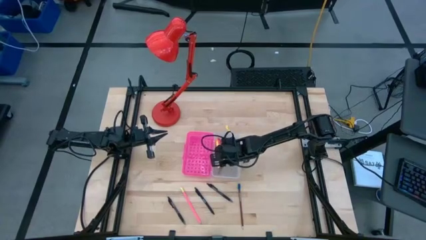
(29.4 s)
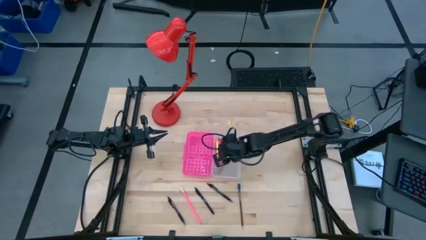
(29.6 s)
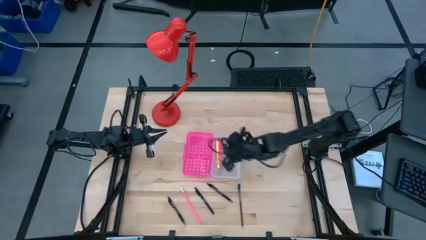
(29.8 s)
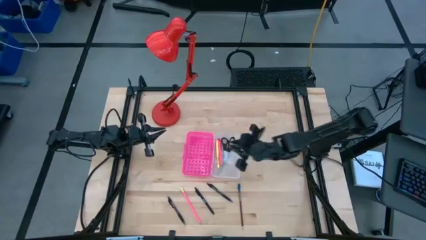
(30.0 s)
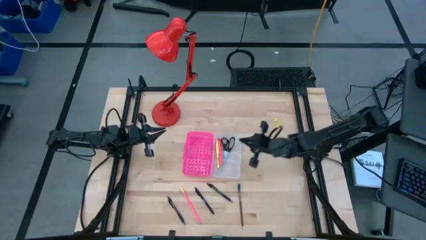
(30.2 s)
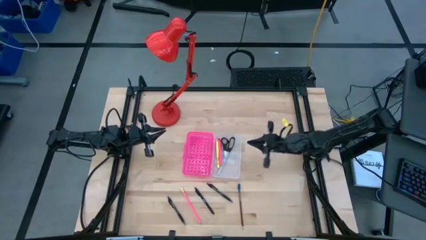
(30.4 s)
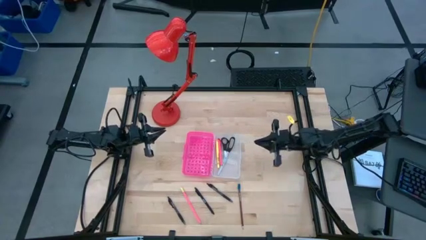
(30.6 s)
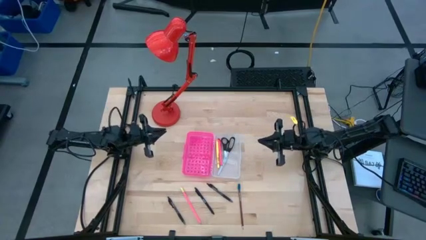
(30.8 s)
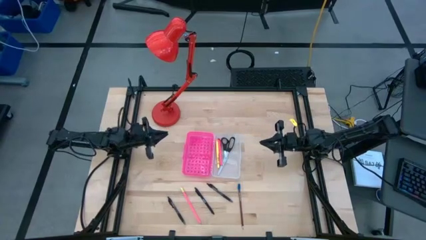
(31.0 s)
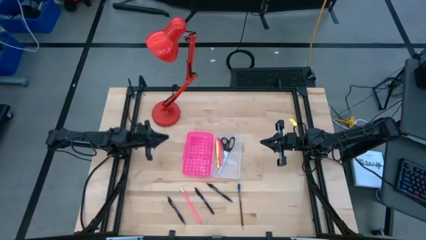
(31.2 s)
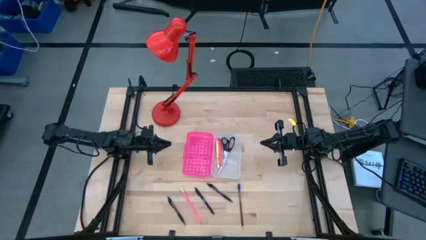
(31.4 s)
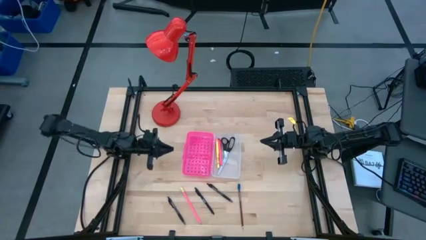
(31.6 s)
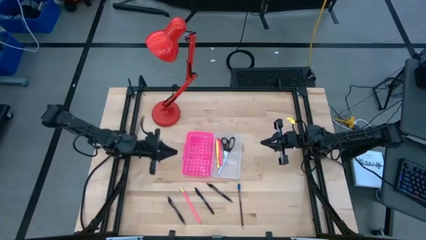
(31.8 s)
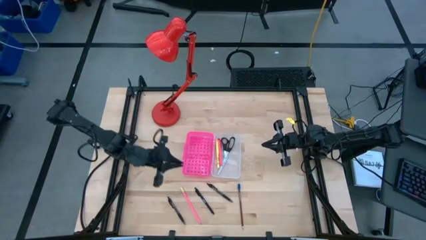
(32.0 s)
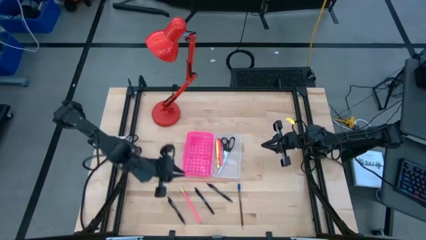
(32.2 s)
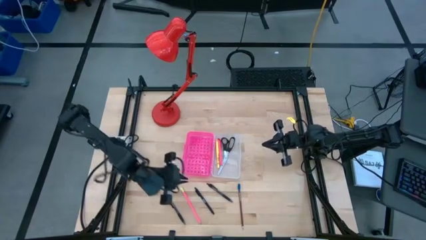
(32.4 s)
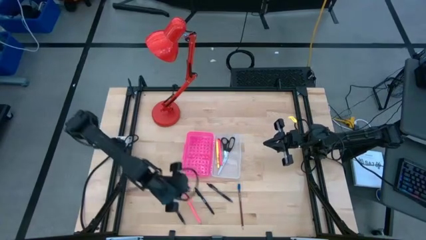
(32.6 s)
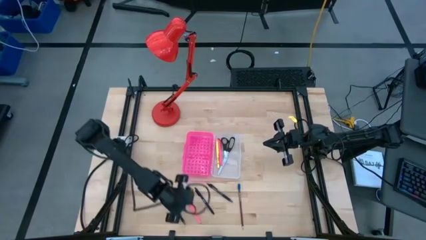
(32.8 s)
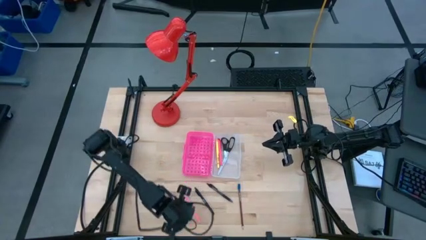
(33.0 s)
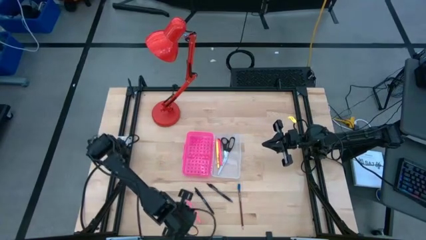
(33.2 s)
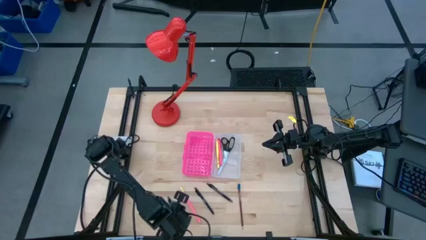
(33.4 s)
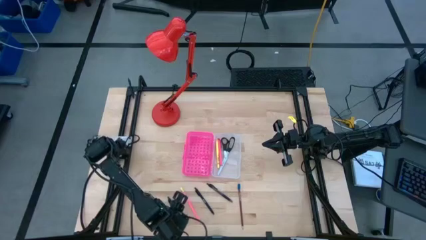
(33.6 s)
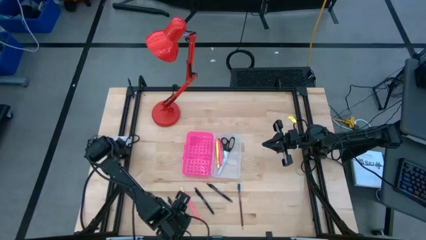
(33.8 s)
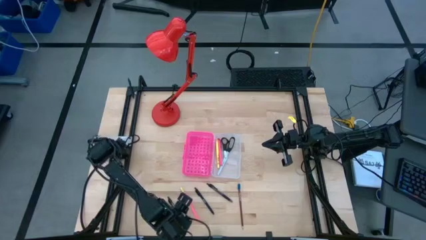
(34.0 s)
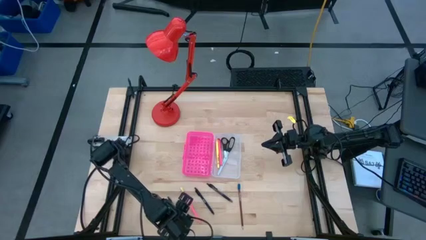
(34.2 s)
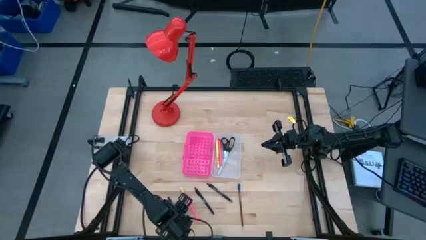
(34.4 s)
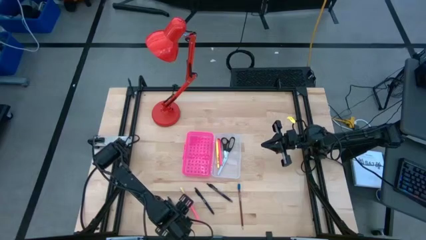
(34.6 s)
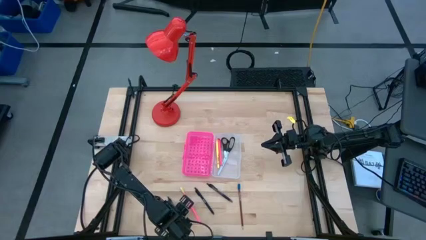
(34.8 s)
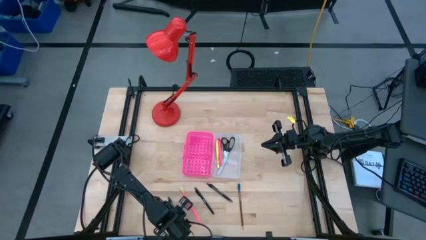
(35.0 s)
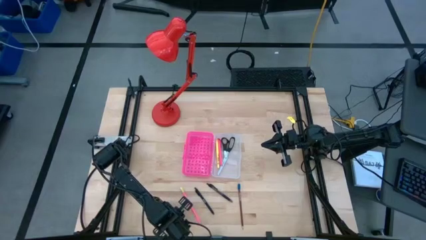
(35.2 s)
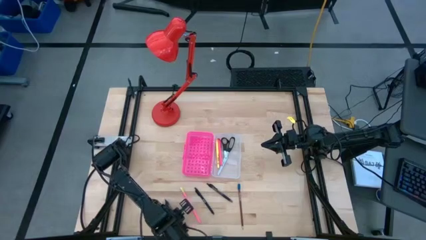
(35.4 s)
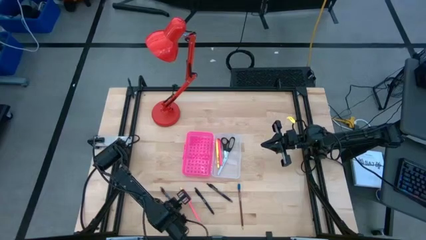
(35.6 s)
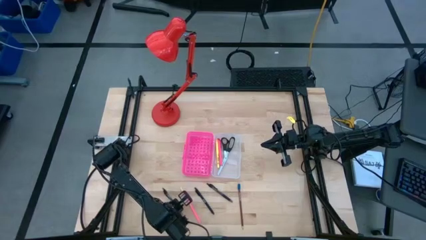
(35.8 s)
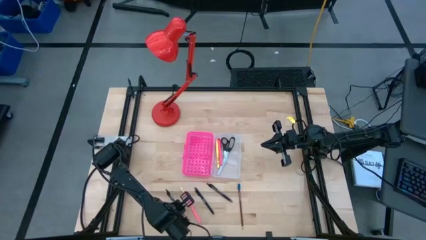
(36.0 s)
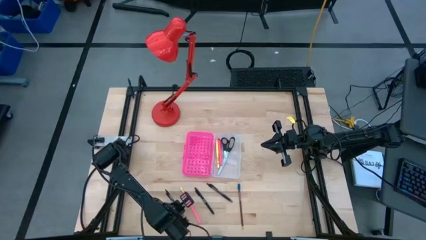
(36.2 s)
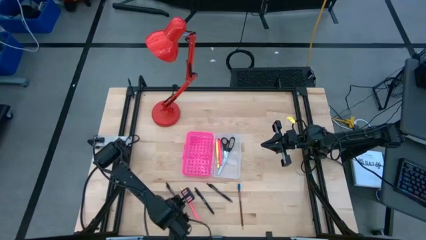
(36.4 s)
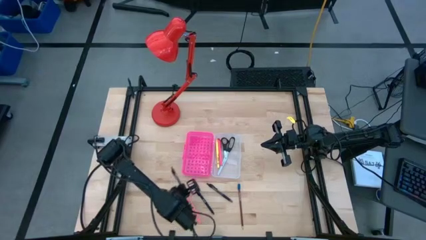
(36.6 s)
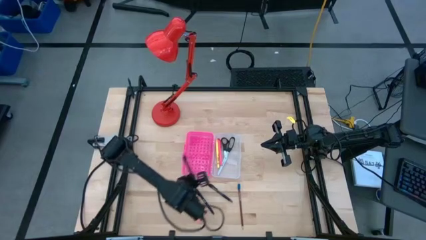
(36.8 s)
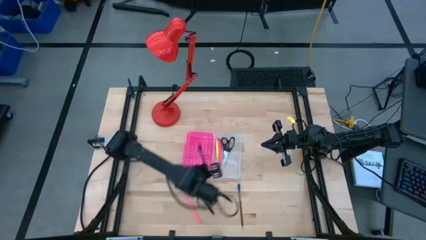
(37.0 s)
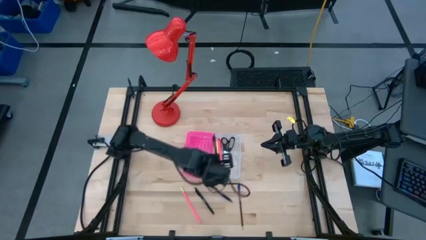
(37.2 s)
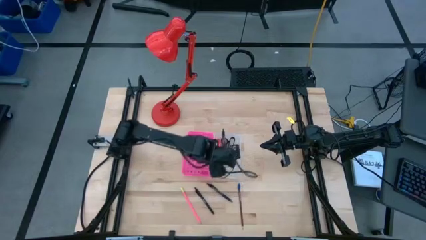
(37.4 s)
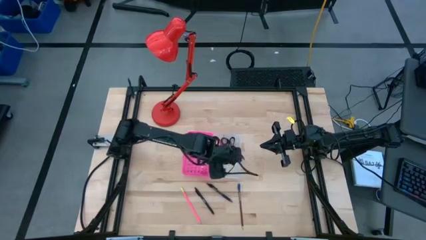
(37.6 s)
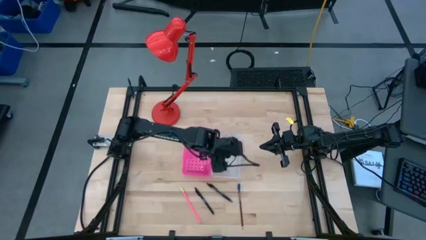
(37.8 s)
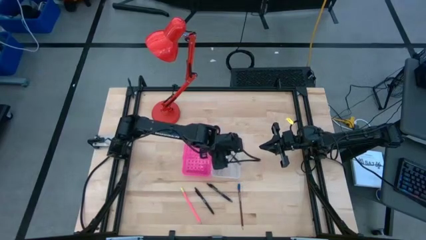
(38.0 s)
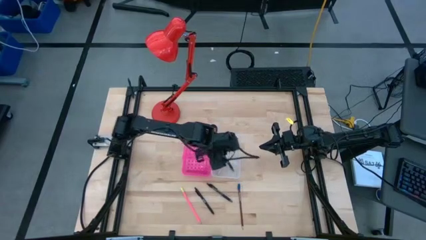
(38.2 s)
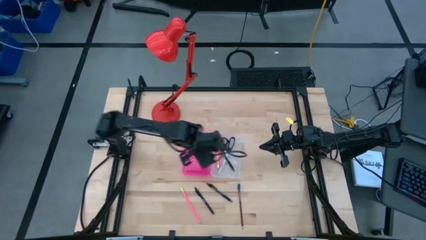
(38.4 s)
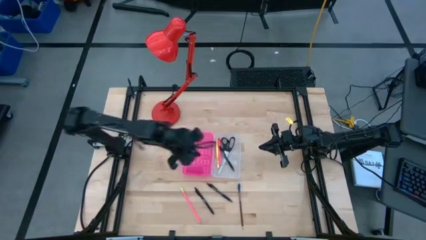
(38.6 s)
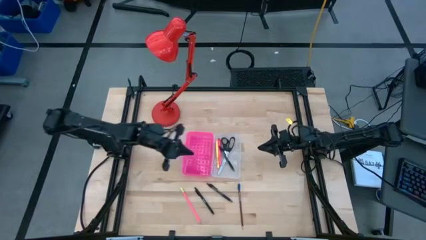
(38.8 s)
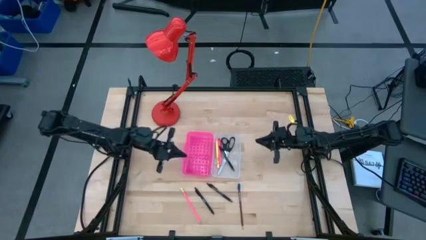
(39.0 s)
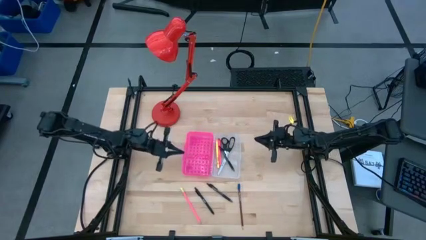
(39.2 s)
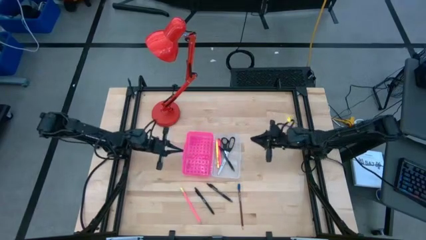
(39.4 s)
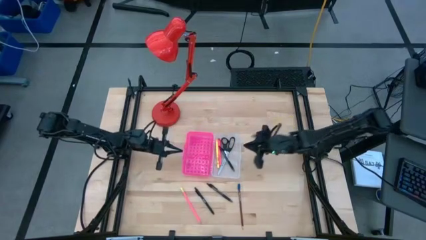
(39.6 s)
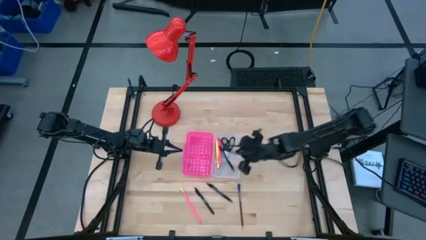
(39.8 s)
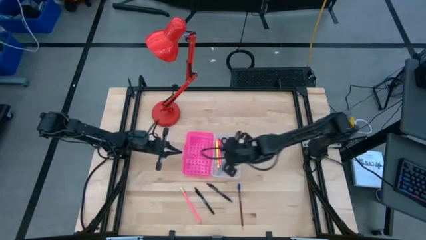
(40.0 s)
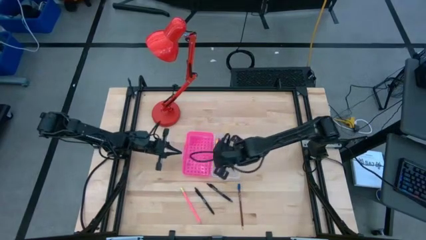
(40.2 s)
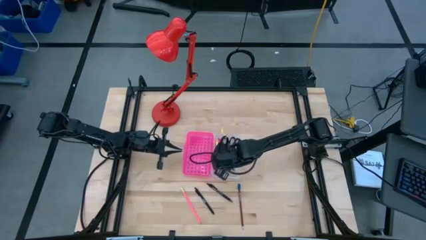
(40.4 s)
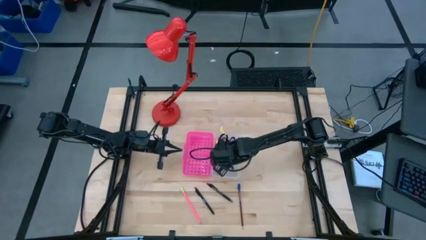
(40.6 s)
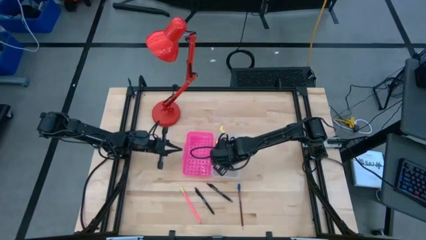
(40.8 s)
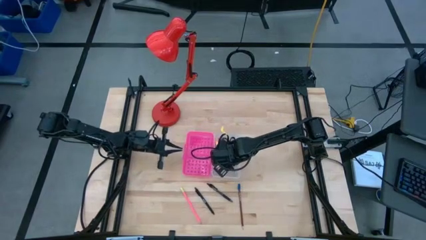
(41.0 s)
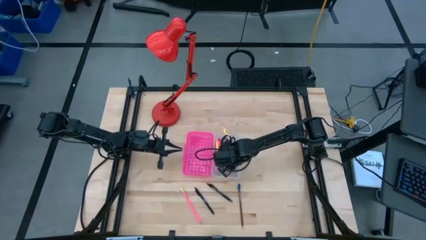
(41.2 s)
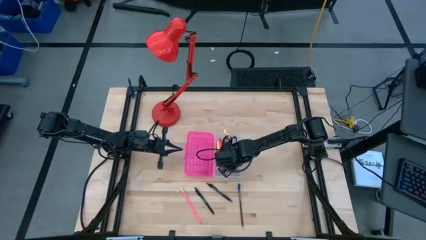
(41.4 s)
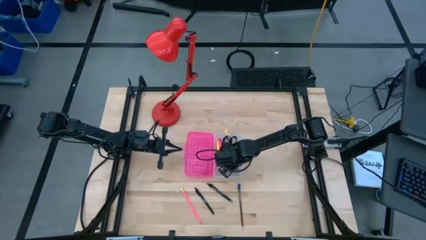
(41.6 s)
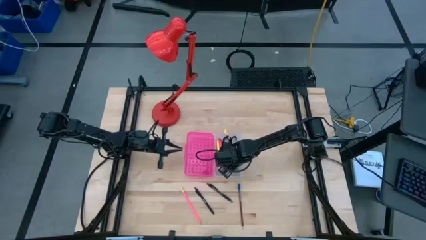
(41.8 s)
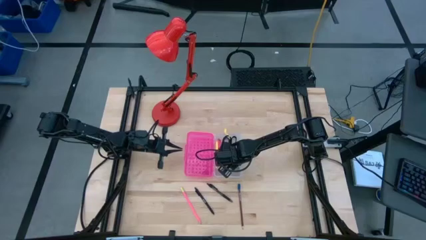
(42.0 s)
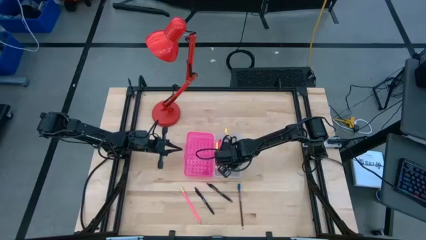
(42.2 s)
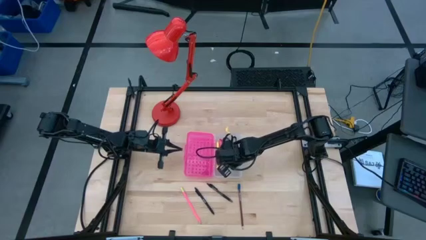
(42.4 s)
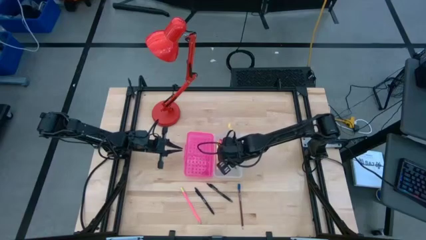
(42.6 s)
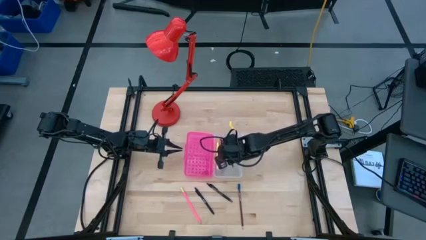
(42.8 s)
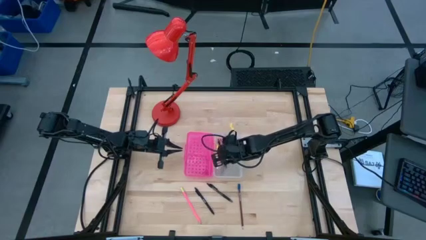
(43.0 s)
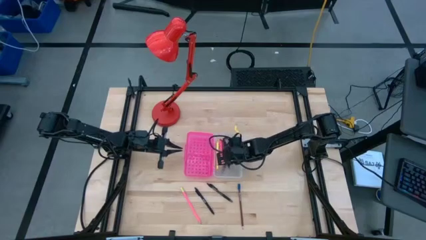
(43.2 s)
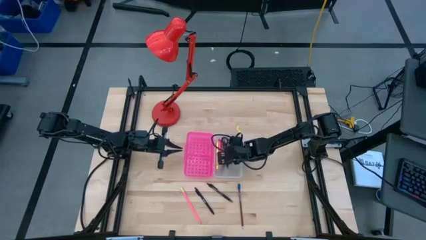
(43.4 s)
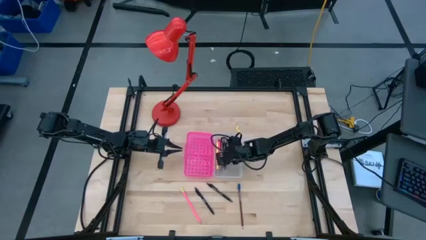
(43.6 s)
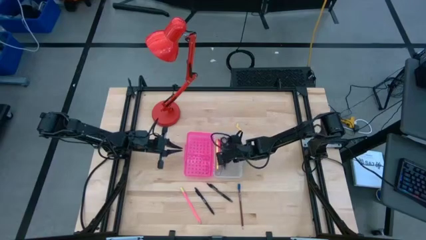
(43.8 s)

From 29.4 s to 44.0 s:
Task: Pick & place school supplies into a supply box
Put the left black pen into the pink supply box
